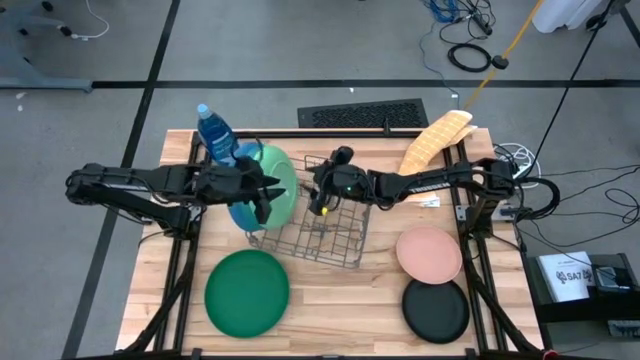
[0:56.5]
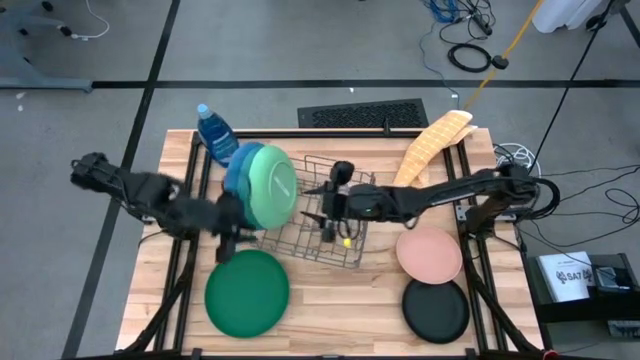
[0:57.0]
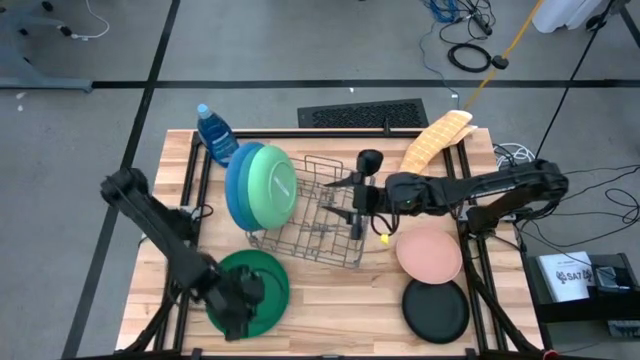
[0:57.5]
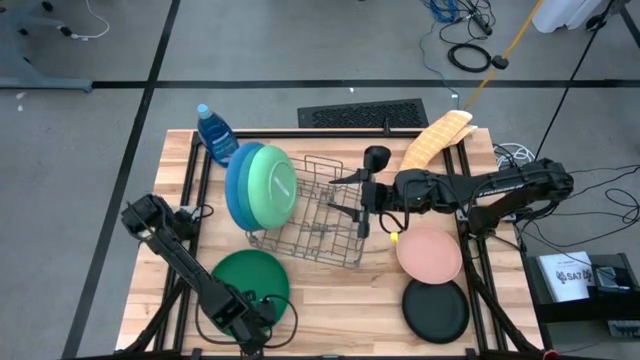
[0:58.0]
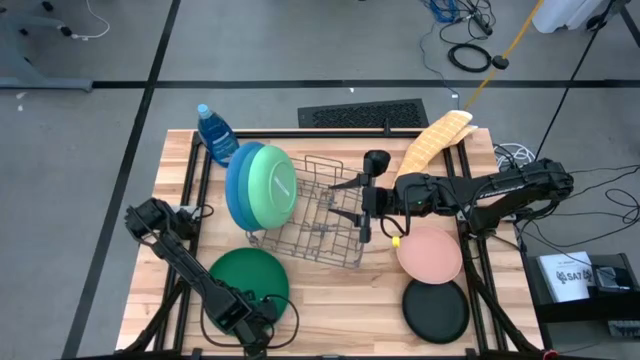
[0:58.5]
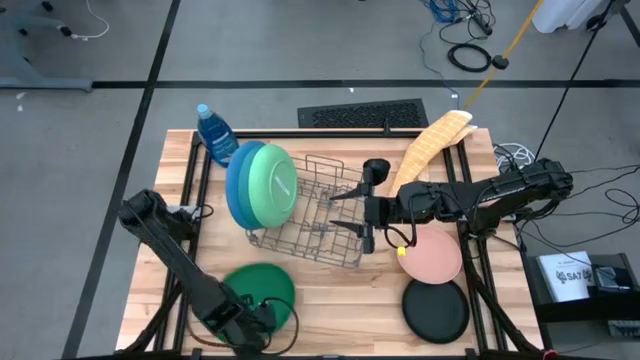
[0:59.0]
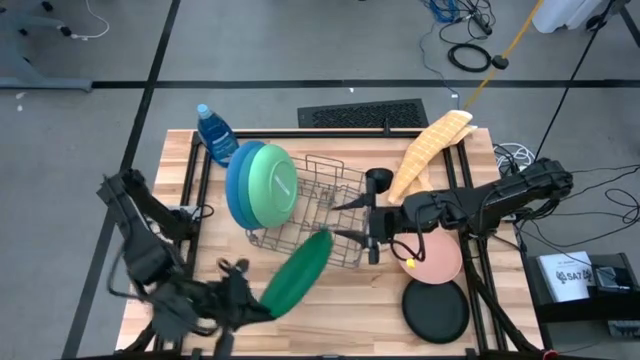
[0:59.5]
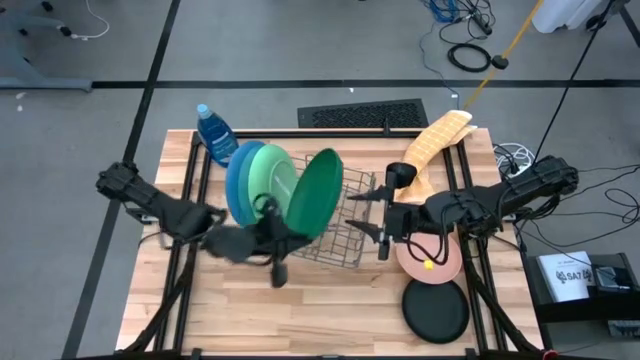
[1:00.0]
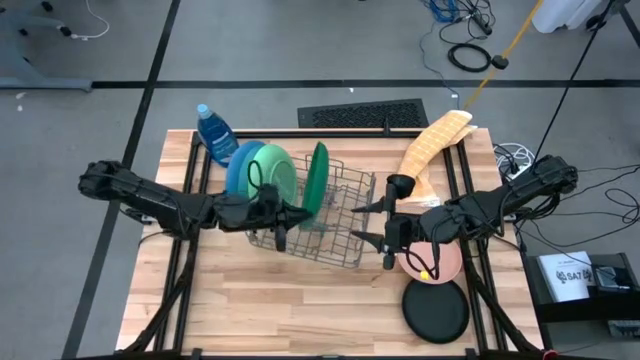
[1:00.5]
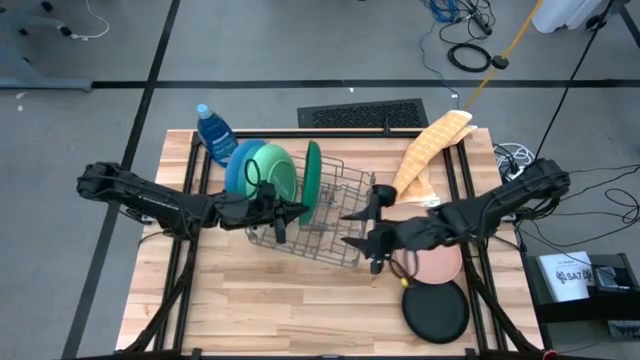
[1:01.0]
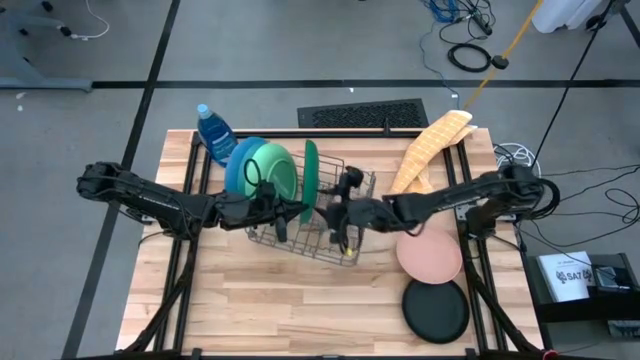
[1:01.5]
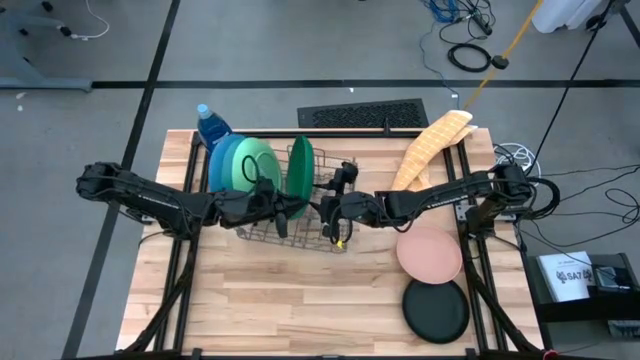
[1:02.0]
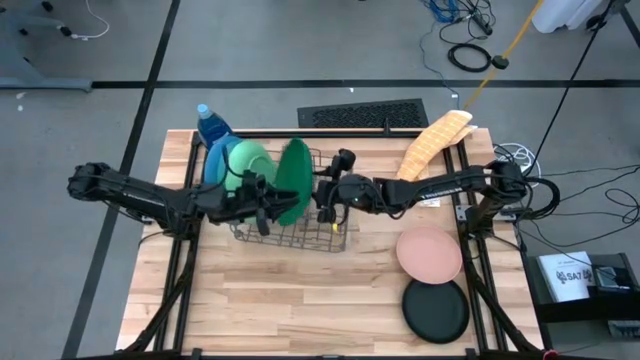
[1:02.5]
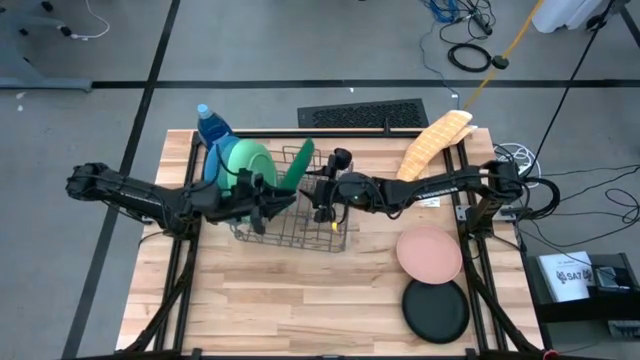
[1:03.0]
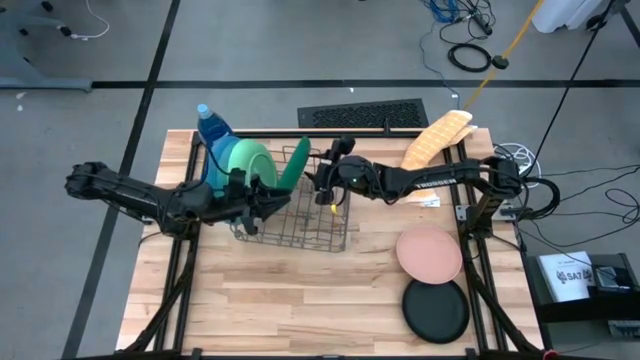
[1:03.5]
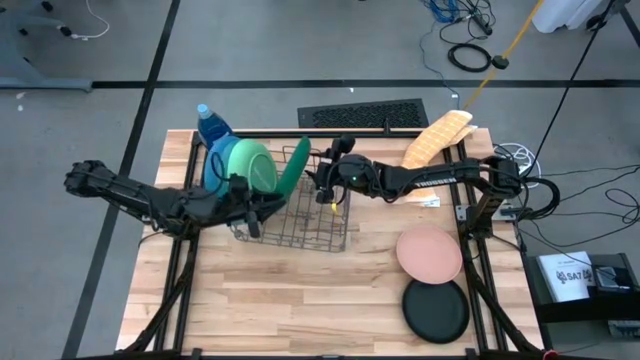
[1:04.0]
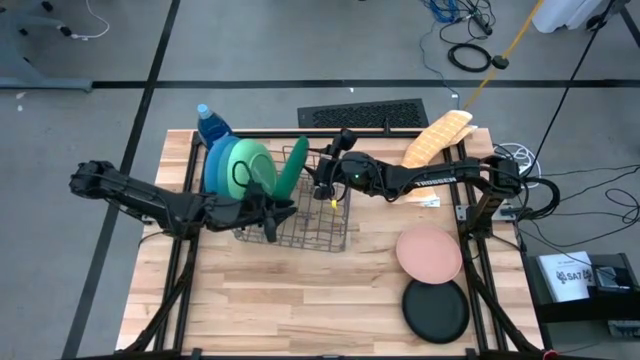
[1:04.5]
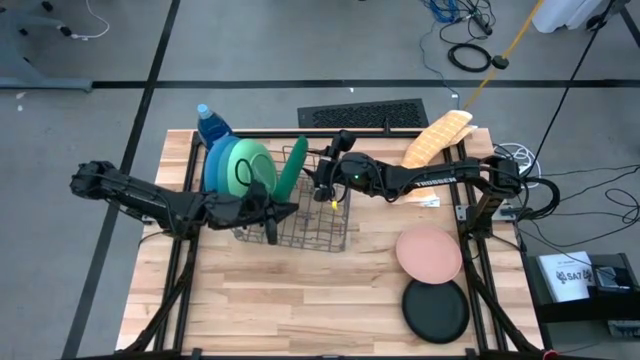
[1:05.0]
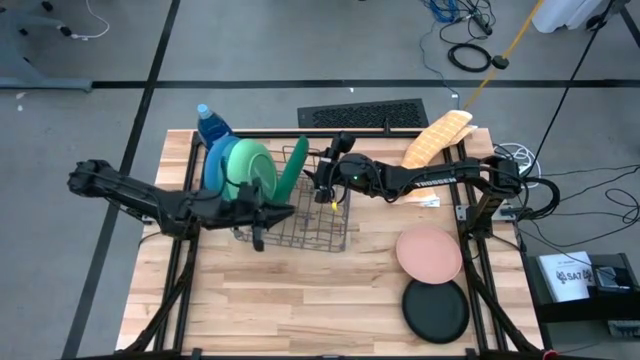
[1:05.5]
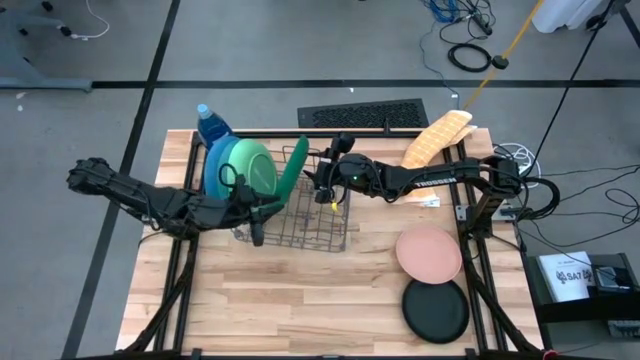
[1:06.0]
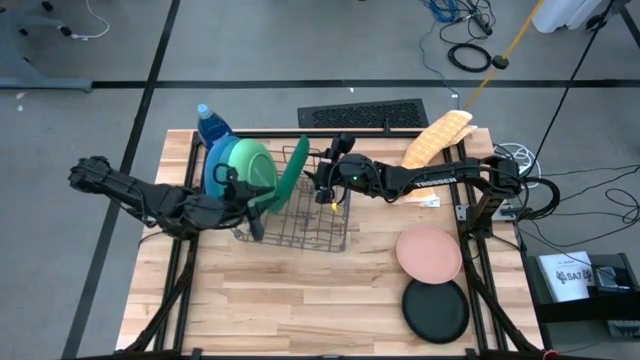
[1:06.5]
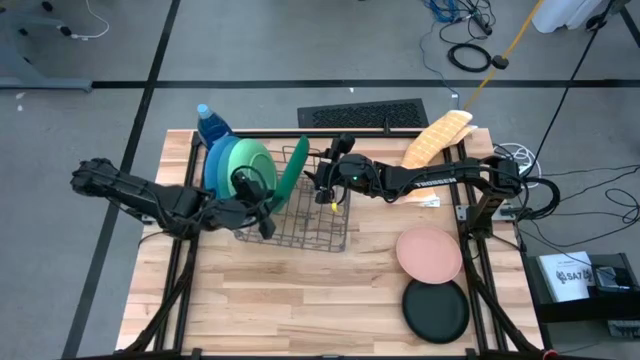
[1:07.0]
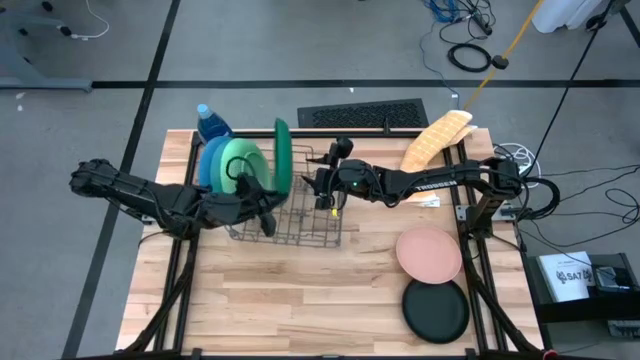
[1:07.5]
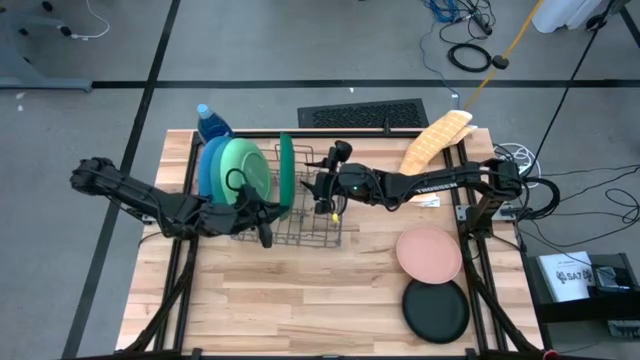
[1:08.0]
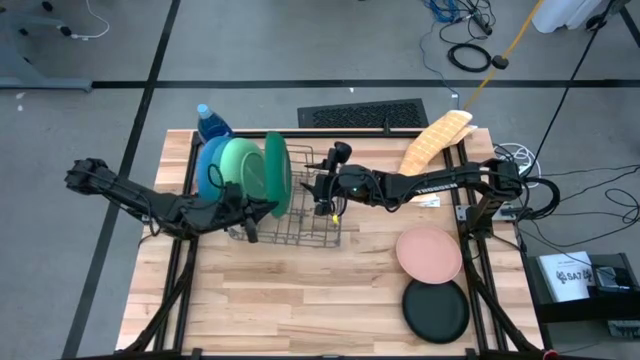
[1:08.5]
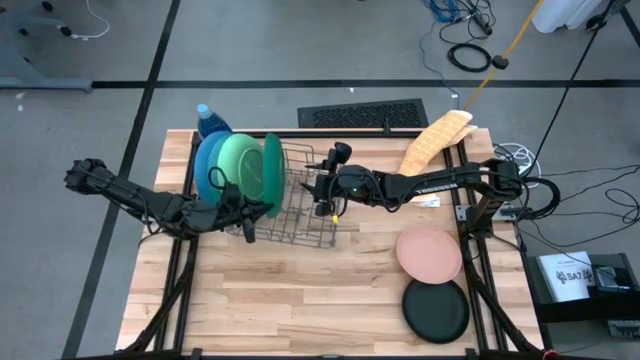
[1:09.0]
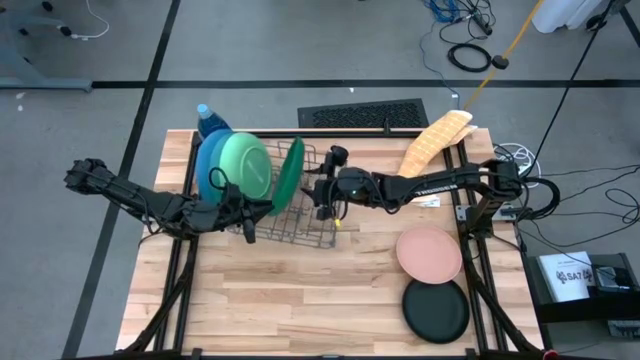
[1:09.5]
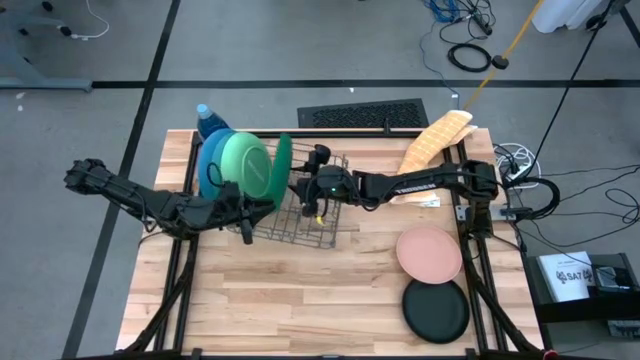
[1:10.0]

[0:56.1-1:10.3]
Task: Sort dishes
Put the dark green plate into the dish rack

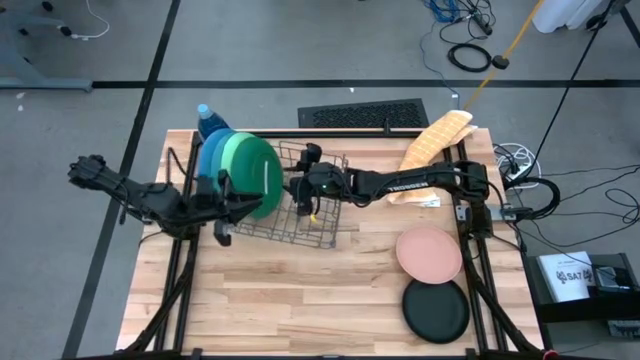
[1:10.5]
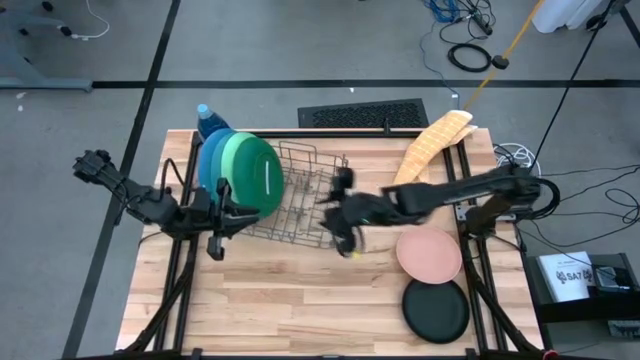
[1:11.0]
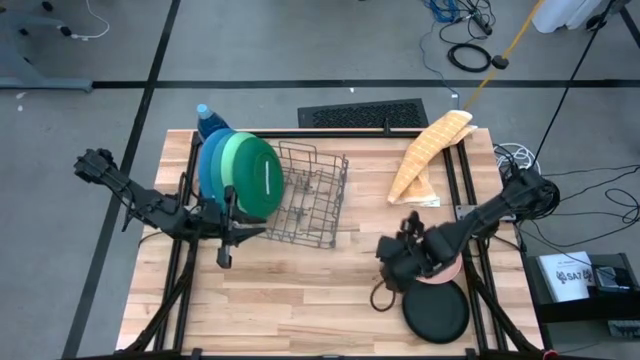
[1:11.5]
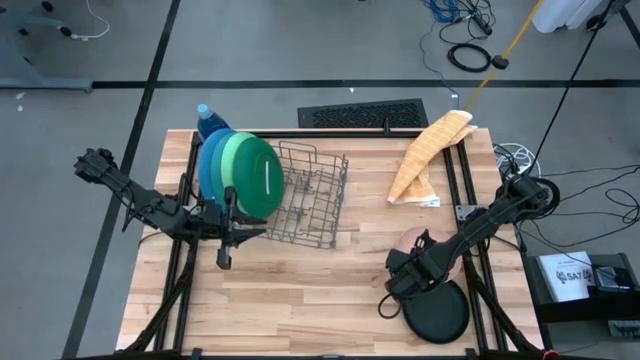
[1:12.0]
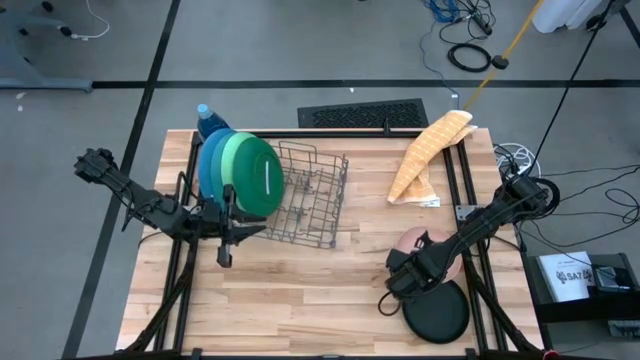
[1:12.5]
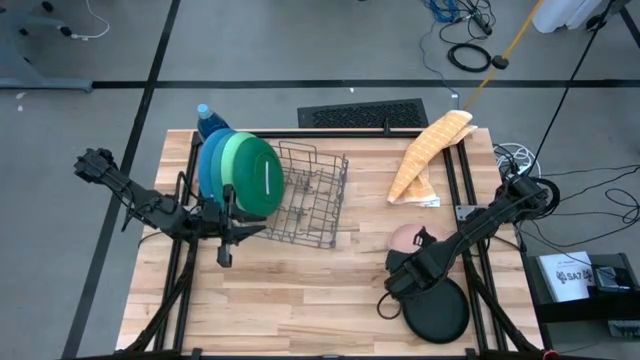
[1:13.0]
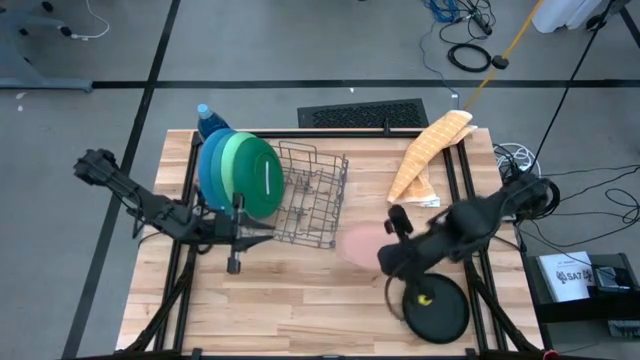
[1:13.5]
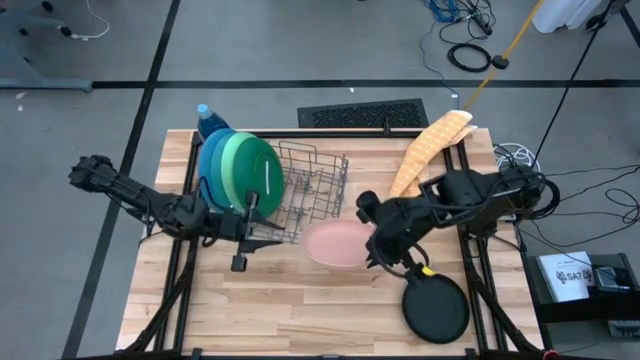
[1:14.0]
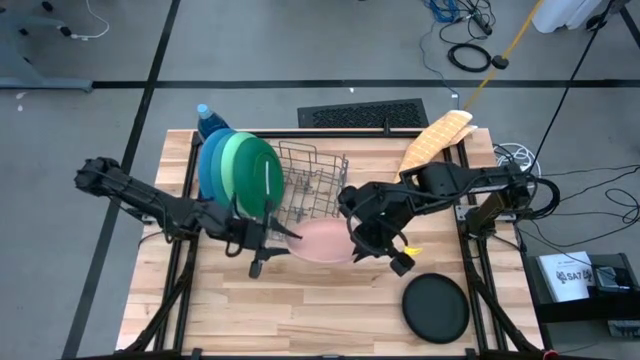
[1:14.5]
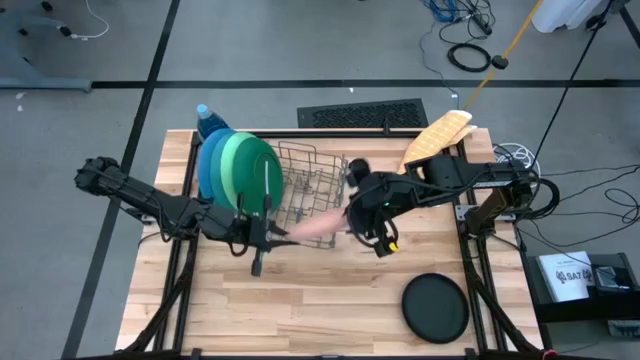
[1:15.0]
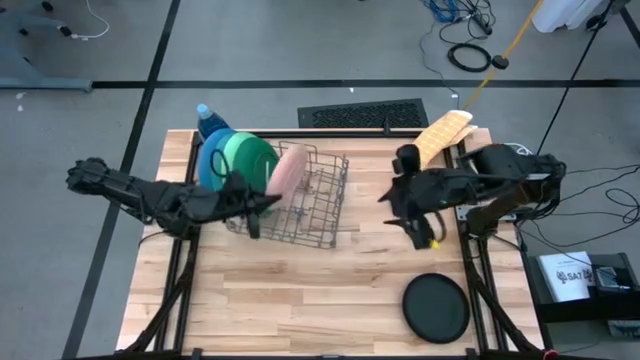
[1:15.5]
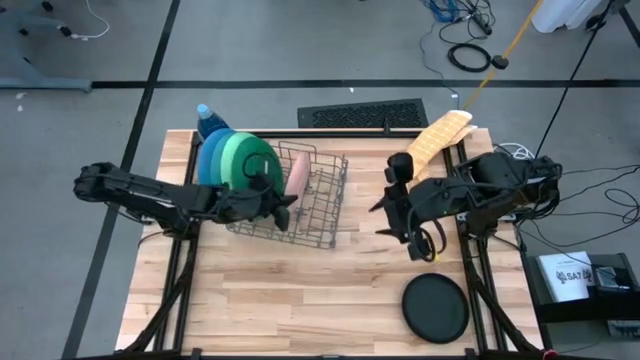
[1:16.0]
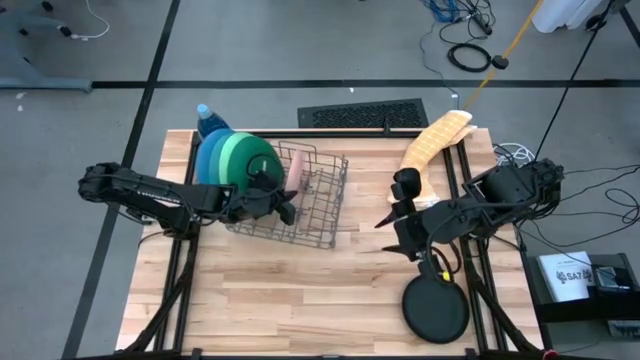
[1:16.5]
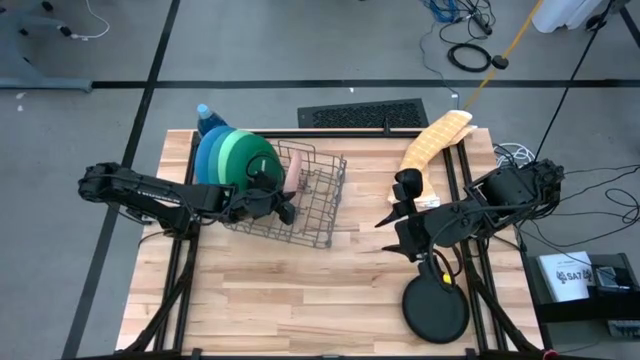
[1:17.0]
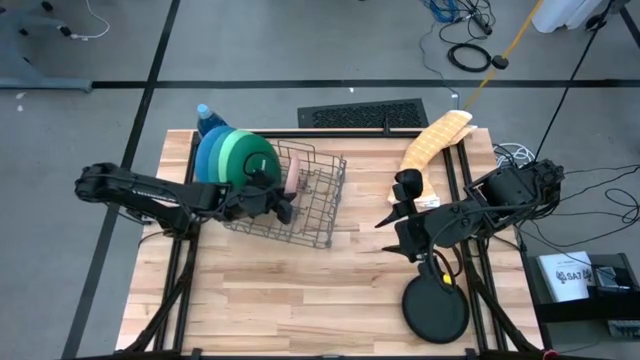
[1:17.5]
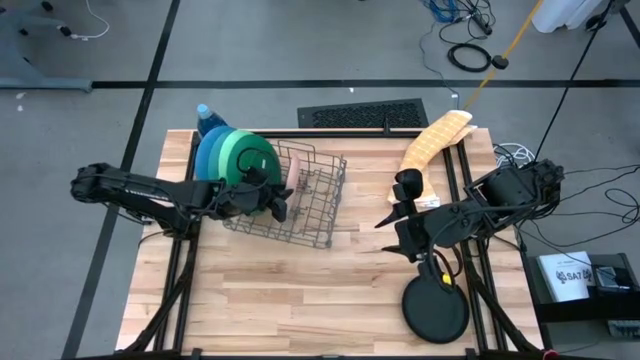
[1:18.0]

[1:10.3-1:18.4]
Put the light orange plate into the dish rack
